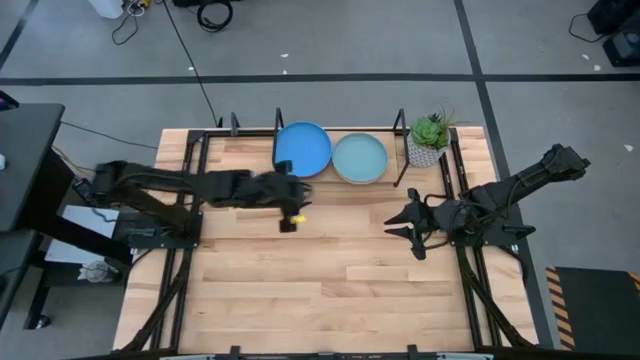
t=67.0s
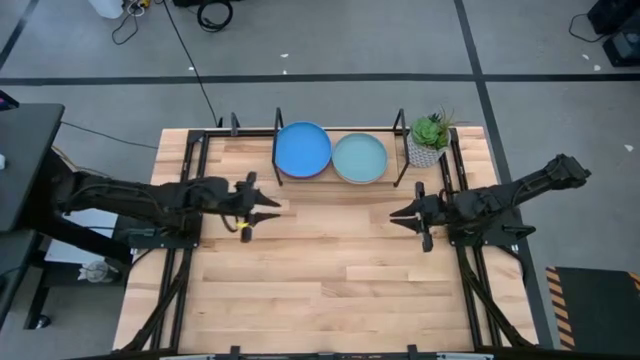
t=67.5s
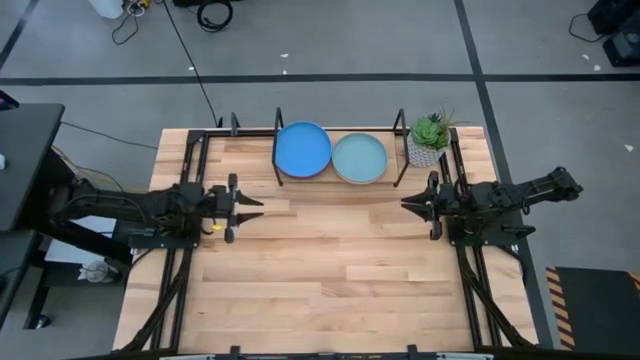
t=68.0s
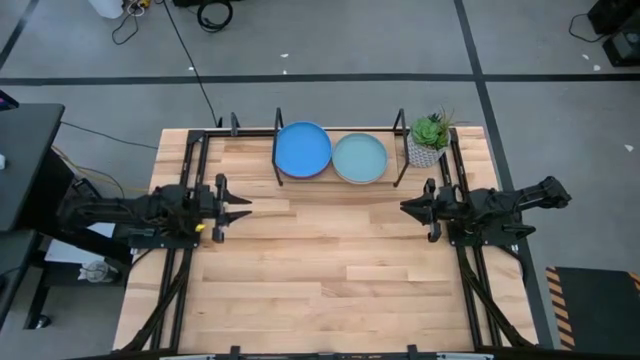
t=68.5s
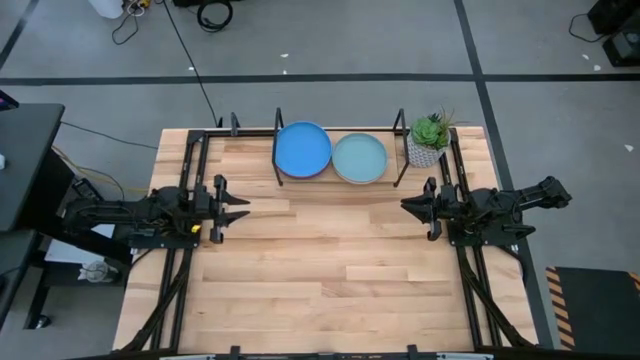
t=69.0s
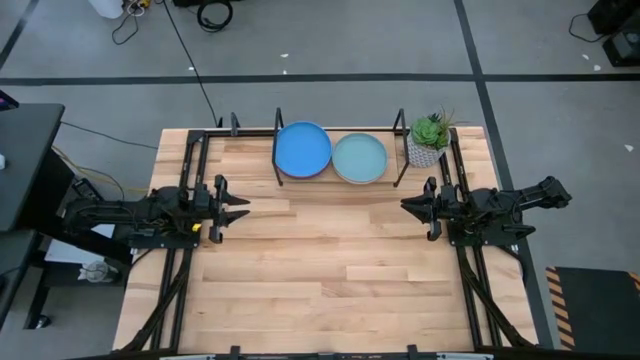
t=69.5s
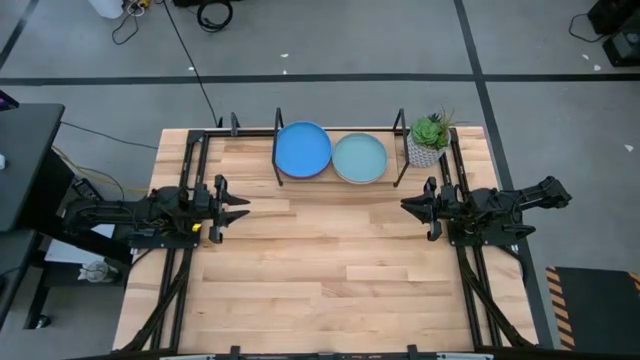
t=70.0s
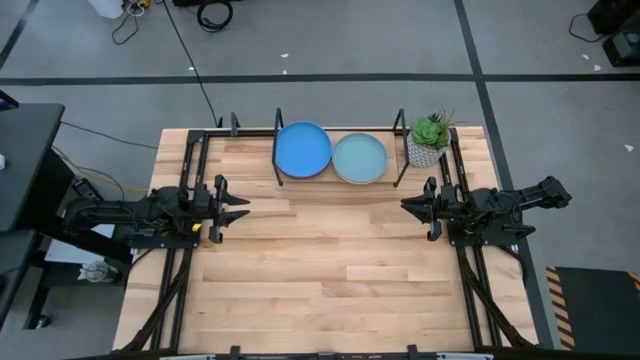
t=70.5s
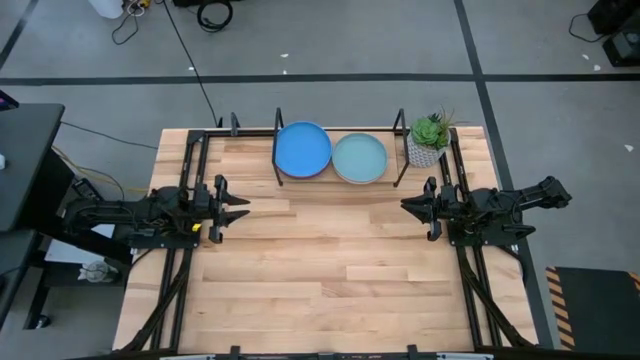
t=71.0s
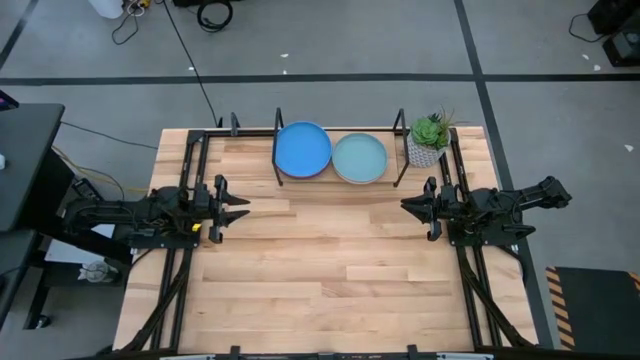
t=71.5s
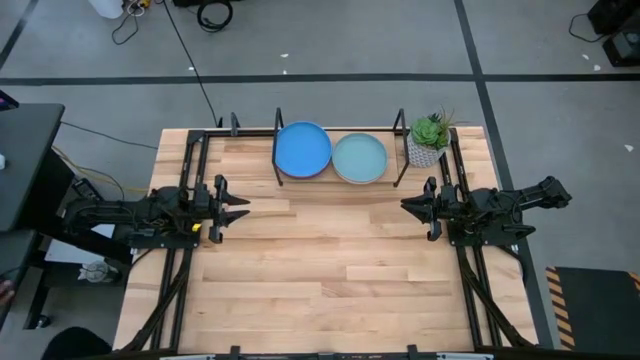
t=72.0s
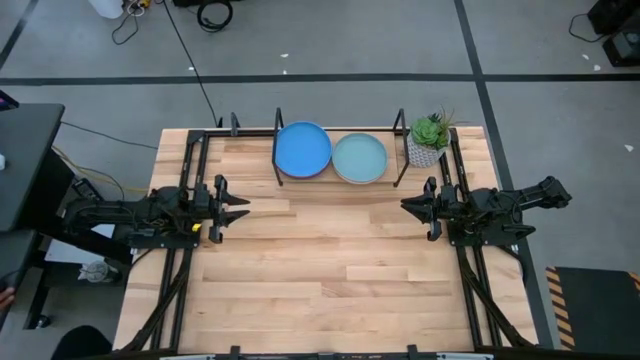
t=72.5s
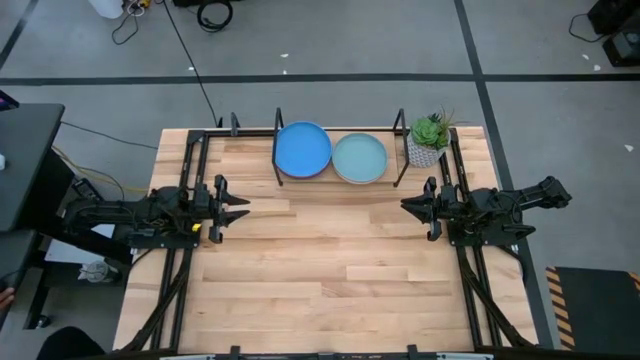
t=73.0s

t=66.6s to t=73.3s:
Task: Place and stack plates onto a shelf
Return to Home Position

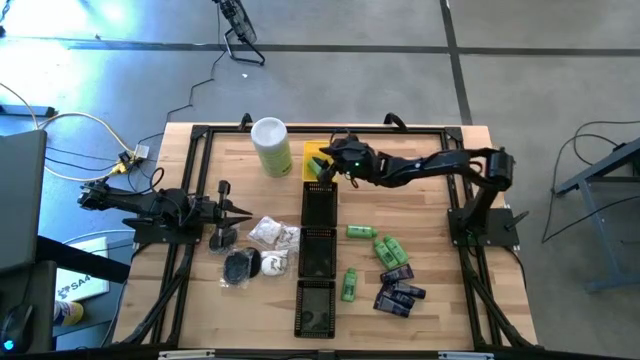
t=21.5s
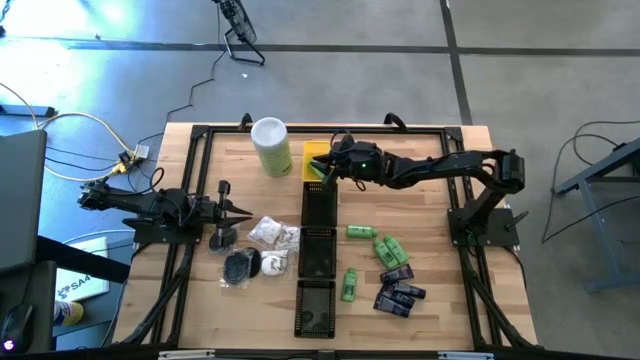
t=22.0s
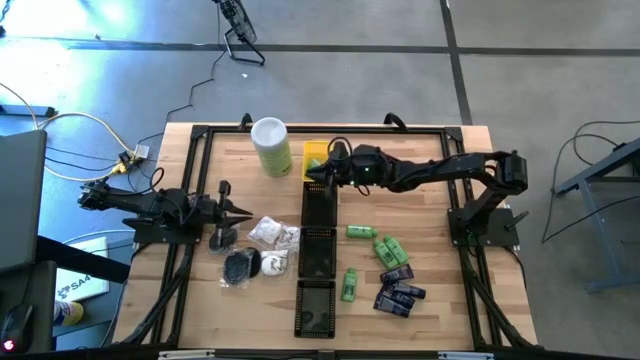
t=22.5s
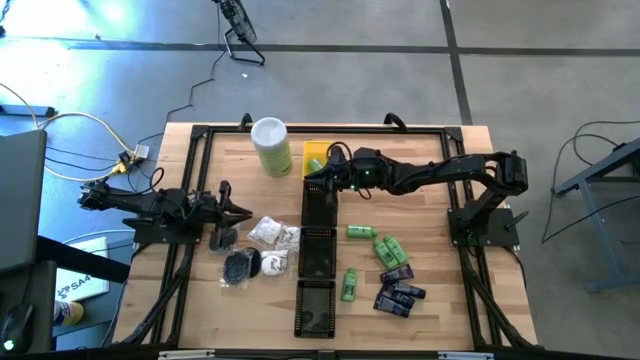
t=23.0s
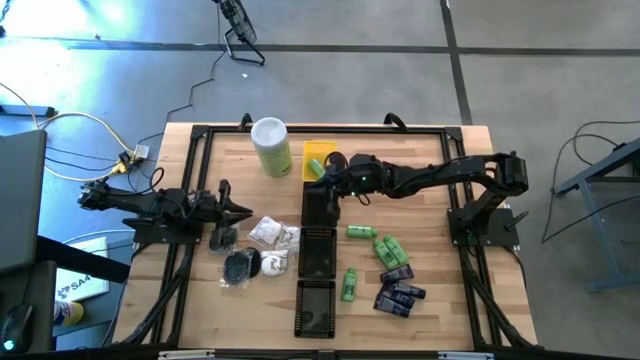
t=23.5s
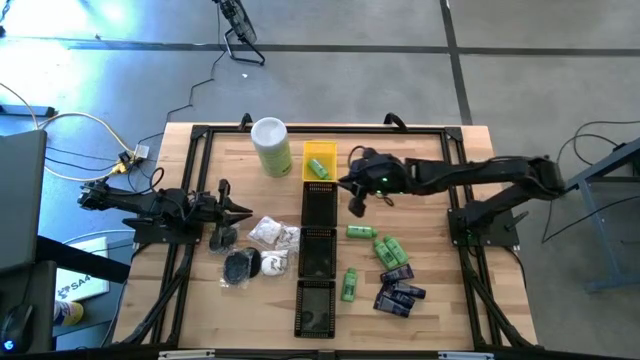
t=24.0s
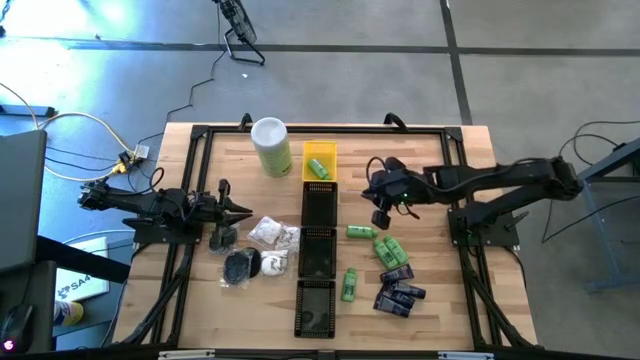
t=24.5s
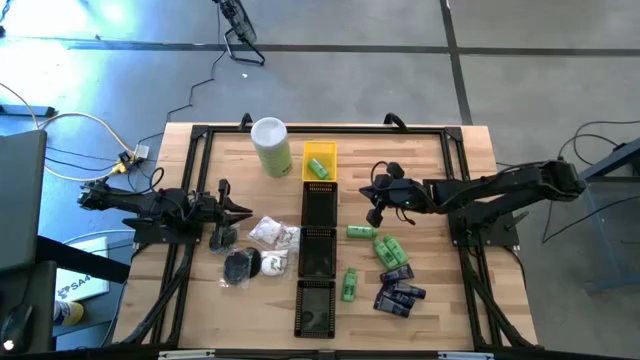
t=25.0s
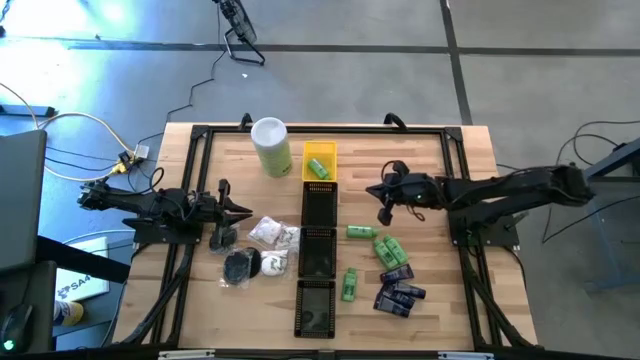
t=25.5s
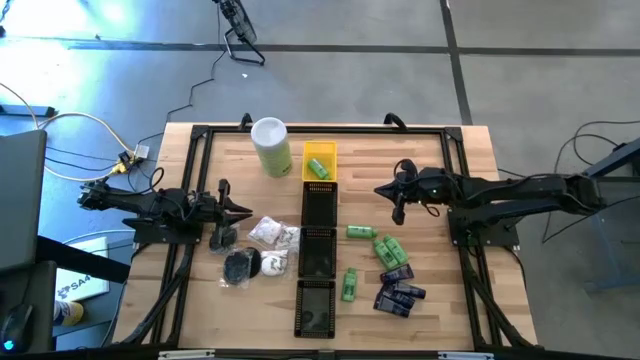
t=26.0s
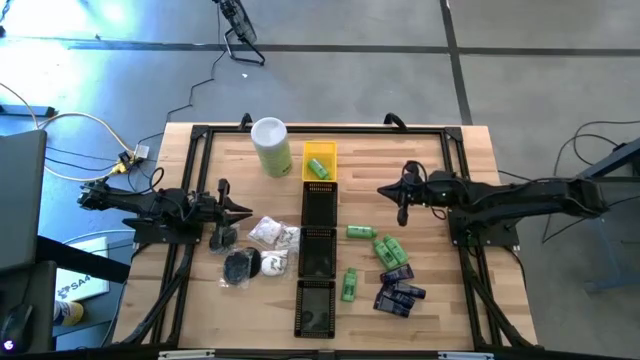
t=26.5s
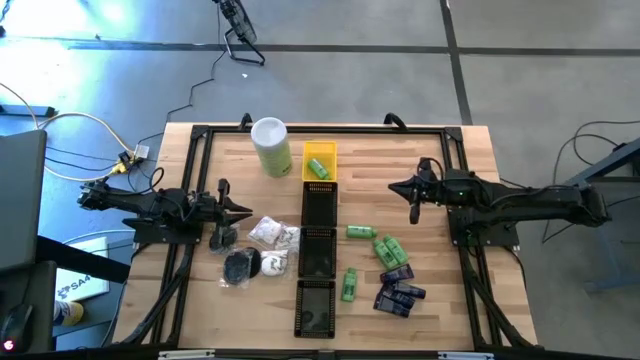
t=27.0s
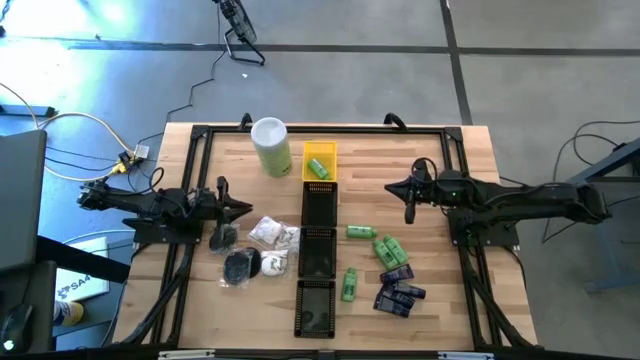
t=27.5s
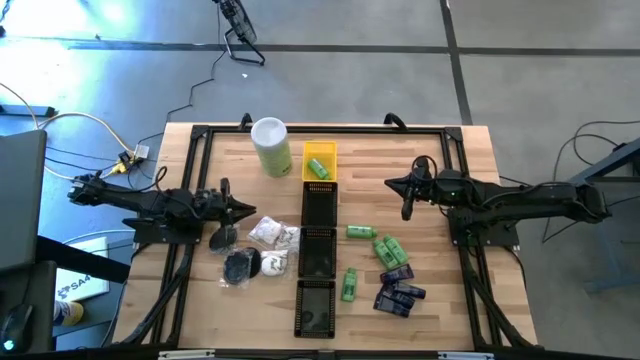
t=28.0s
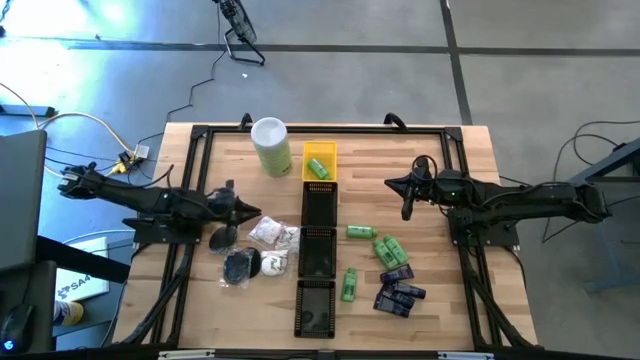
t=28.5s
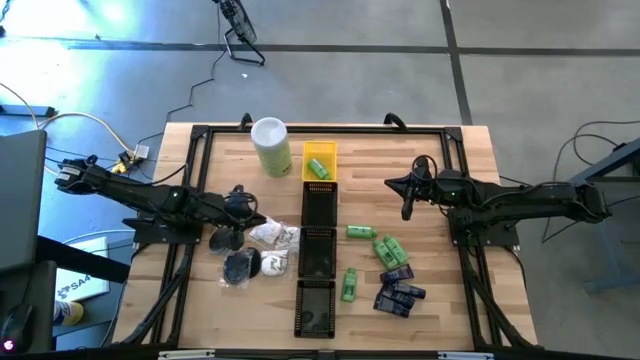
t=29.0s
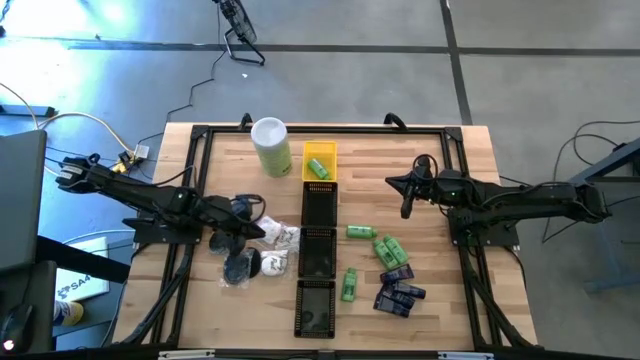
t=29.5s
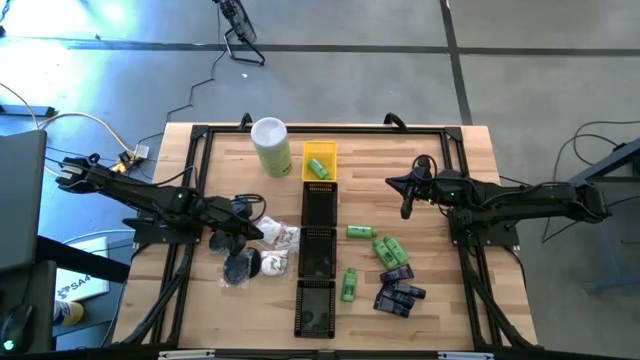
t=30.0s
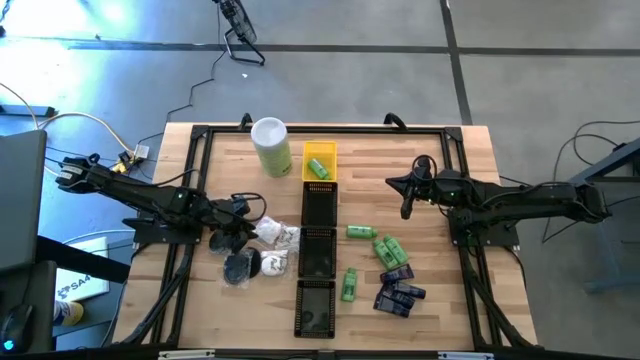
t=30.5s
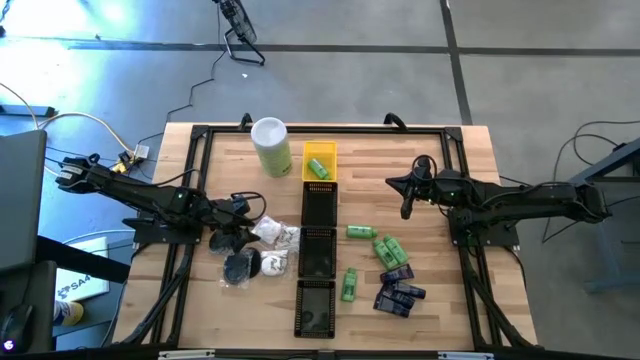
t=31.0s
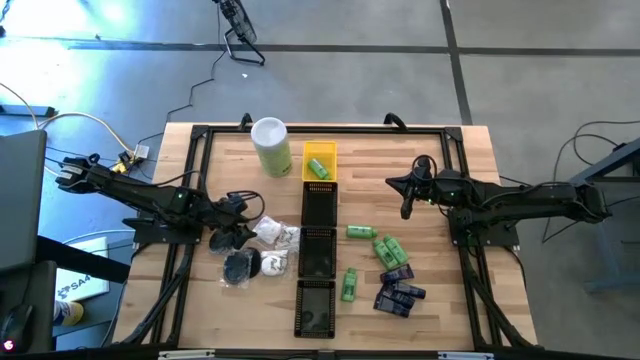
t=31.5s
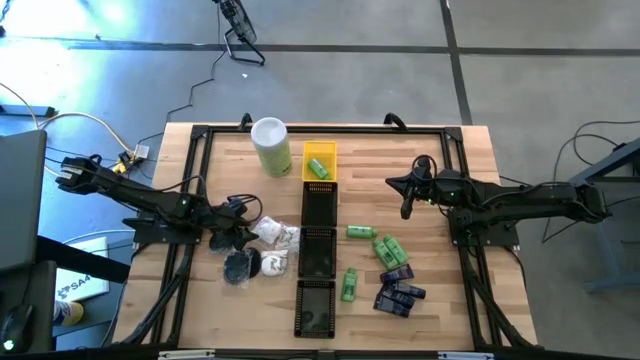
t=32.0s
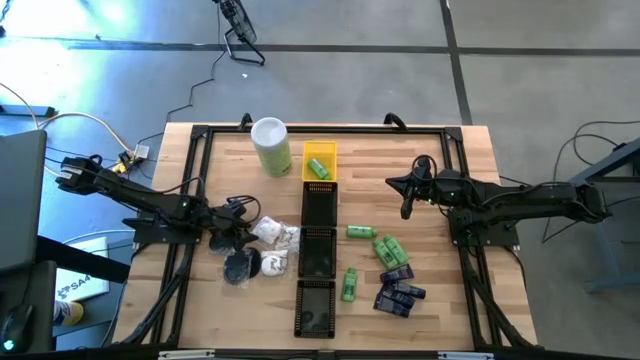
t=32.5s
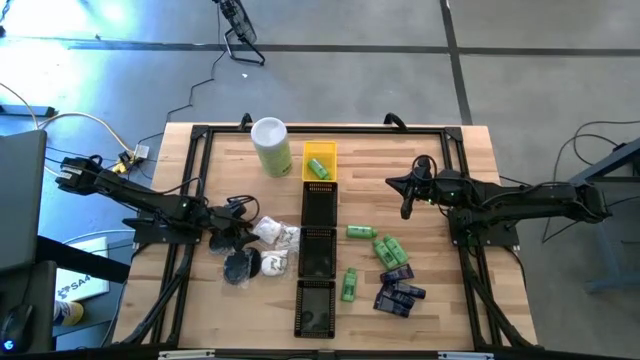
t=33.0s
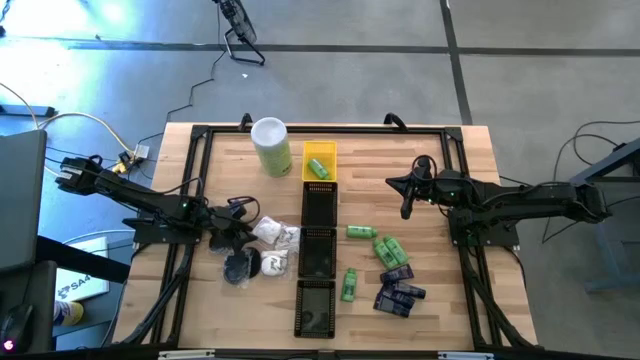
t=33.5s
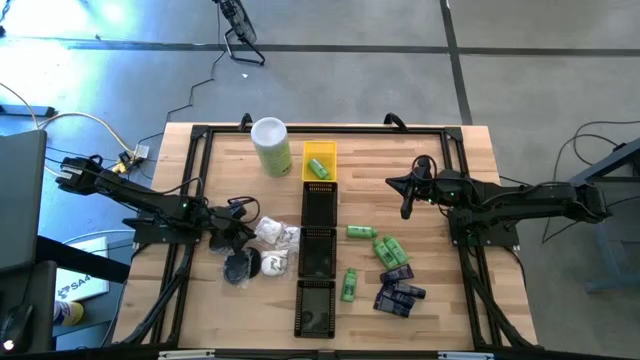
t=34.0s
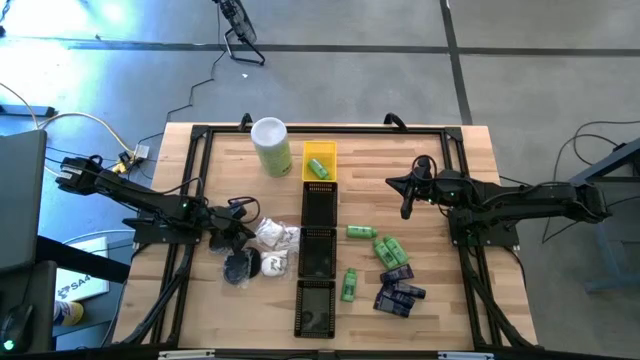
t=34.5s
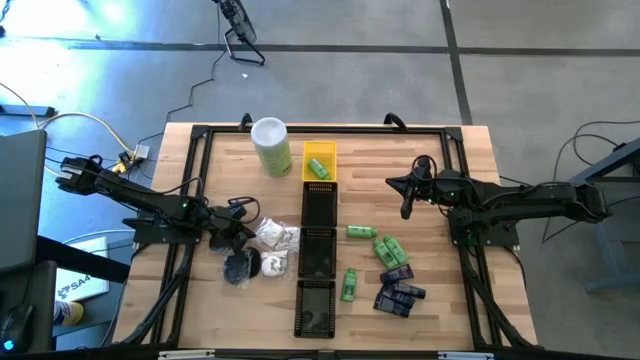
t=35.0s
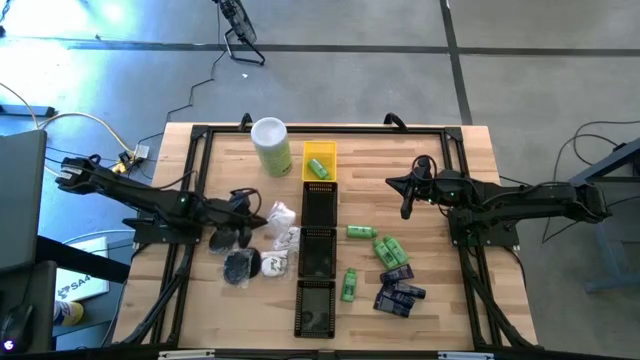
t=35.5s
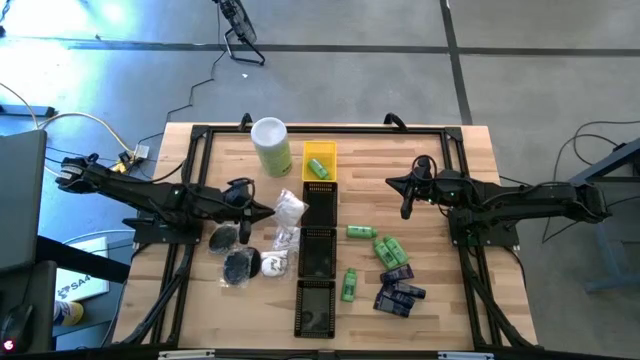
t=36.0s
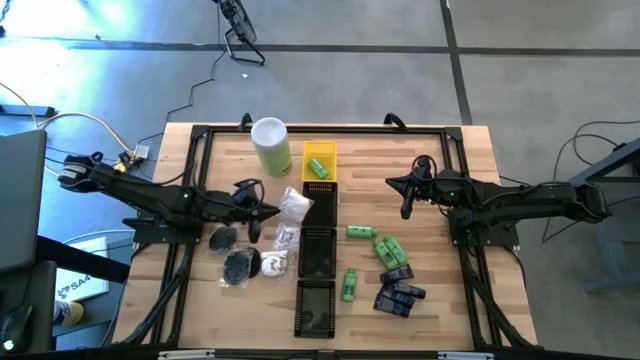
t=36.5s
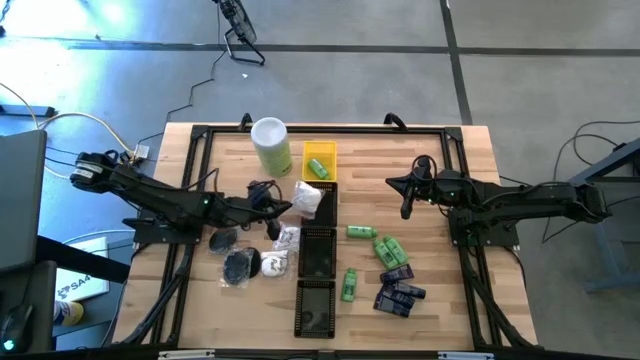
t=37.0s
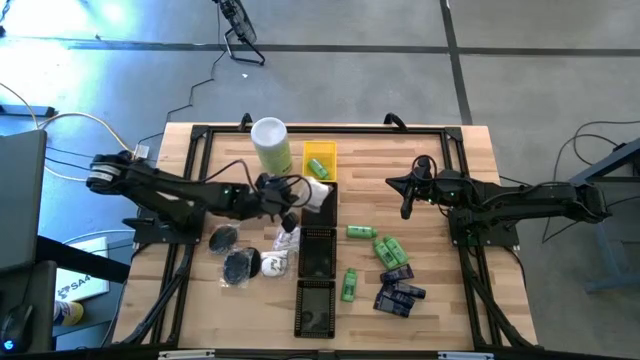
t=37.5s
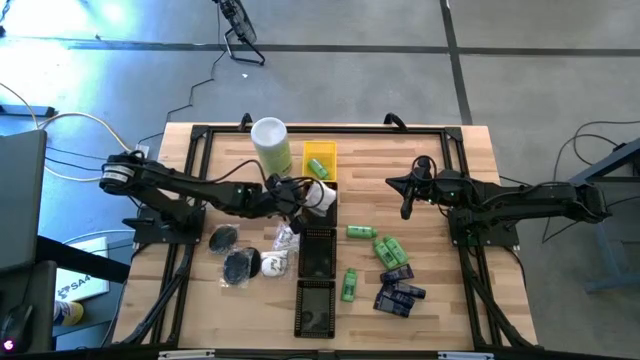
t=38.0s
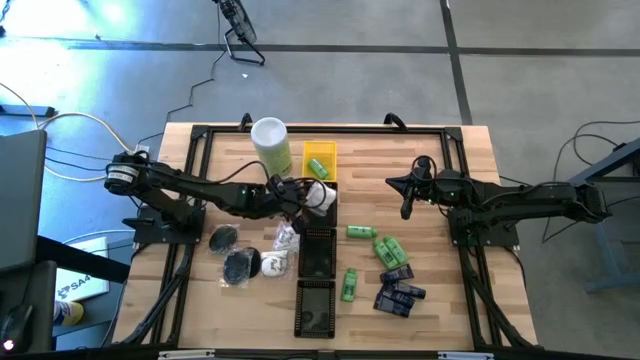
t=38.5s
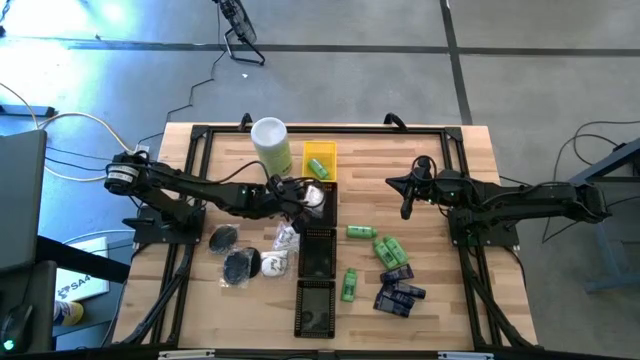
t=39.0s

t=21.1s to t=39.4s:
Task: Pick & Place Travel size toiletries
Put the top left white vanity pack into the top black basket
